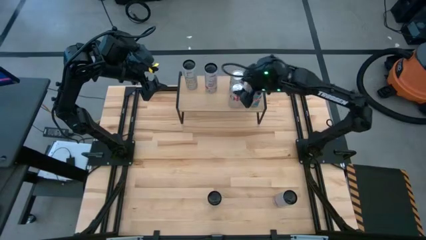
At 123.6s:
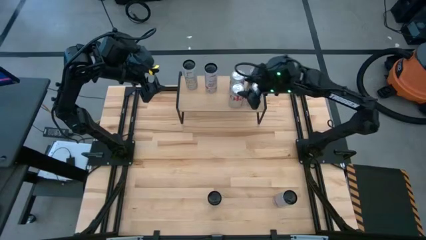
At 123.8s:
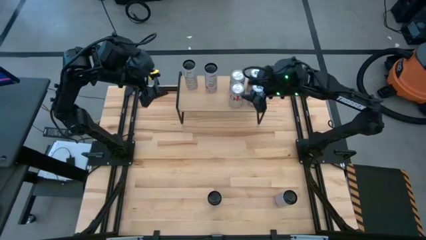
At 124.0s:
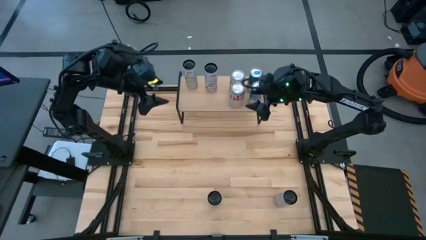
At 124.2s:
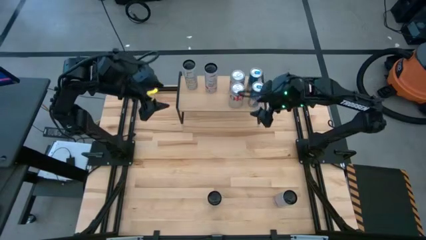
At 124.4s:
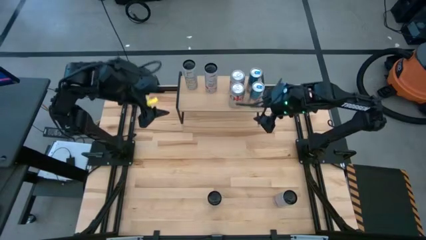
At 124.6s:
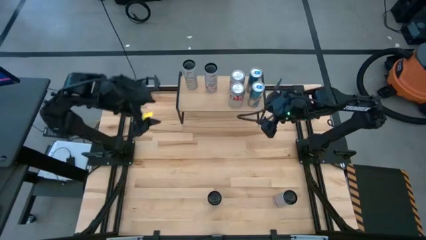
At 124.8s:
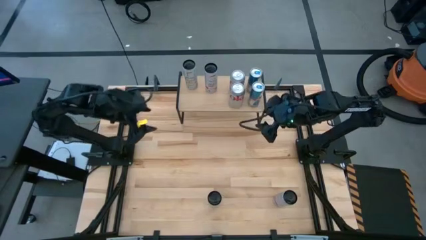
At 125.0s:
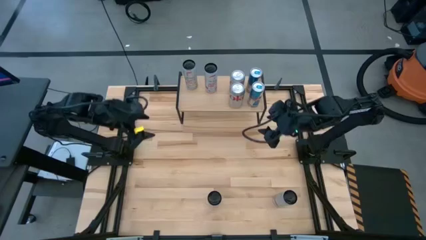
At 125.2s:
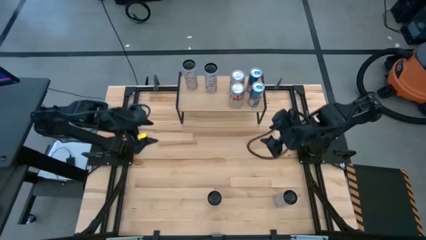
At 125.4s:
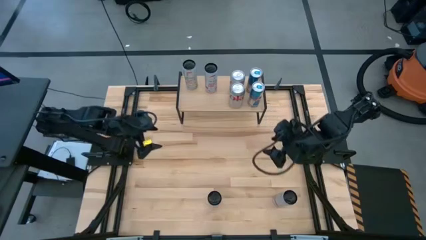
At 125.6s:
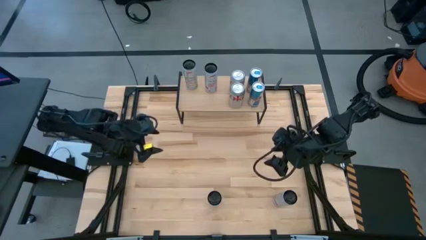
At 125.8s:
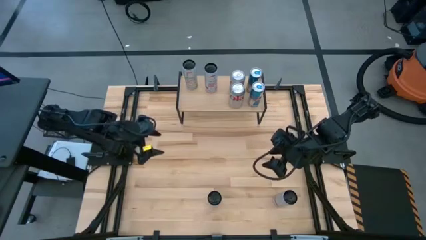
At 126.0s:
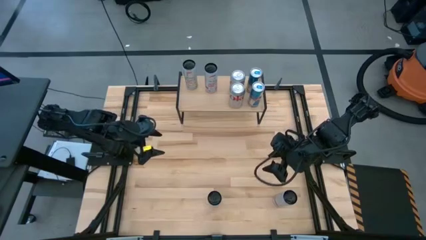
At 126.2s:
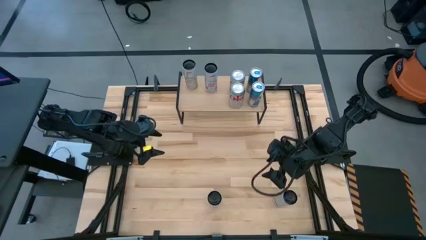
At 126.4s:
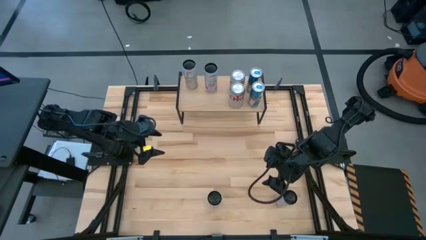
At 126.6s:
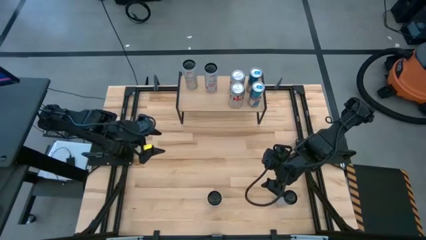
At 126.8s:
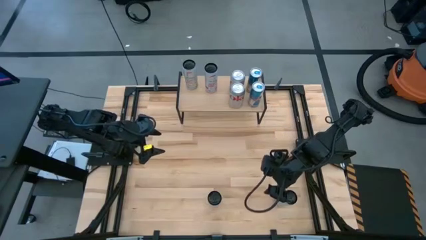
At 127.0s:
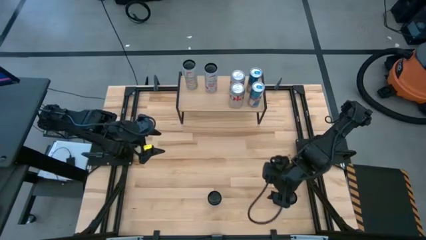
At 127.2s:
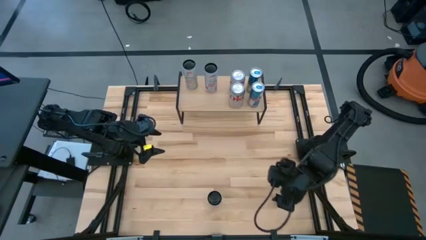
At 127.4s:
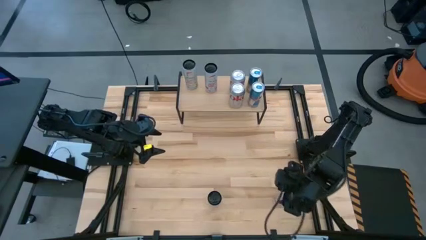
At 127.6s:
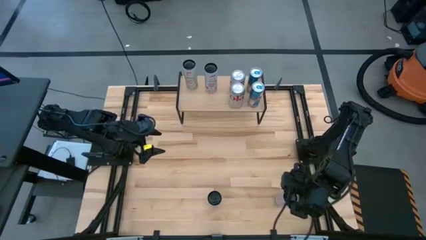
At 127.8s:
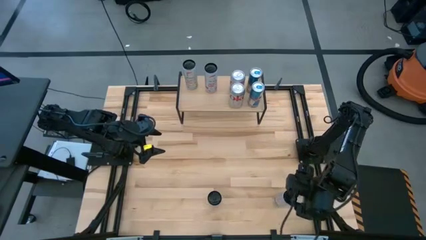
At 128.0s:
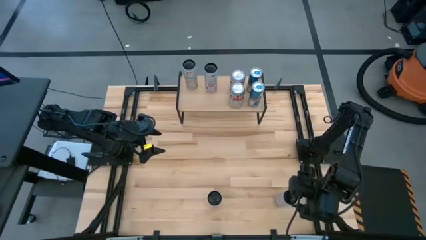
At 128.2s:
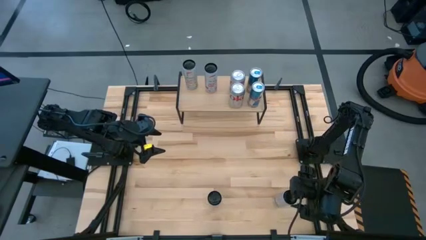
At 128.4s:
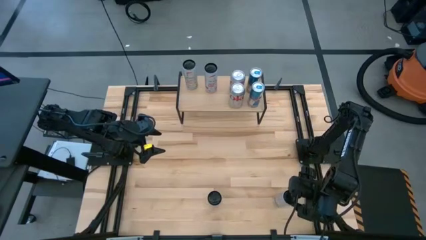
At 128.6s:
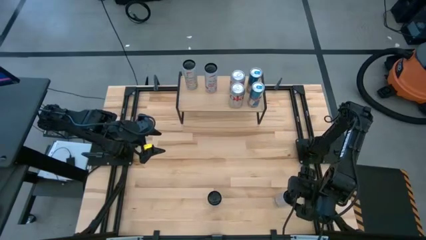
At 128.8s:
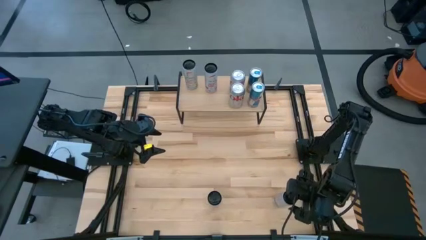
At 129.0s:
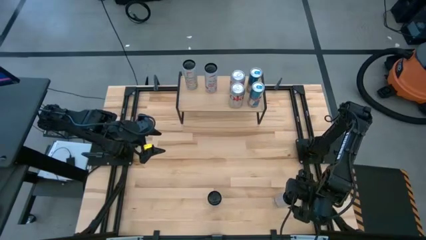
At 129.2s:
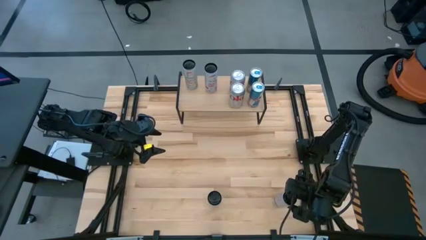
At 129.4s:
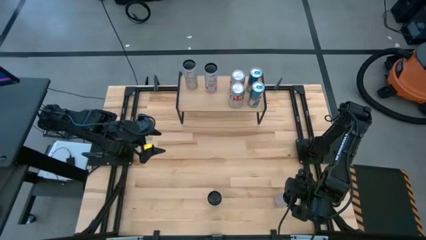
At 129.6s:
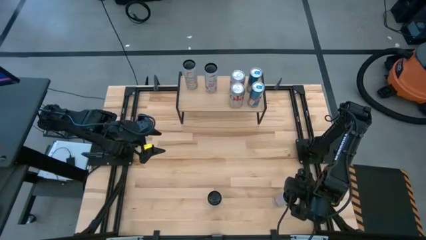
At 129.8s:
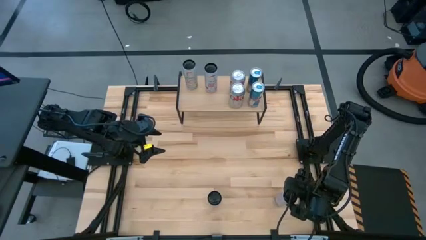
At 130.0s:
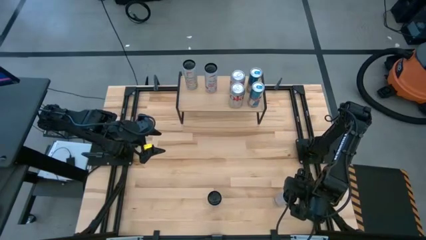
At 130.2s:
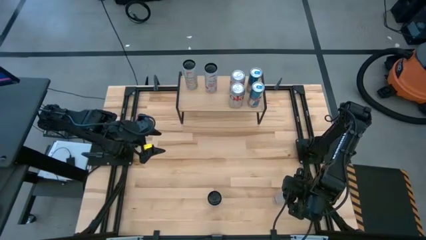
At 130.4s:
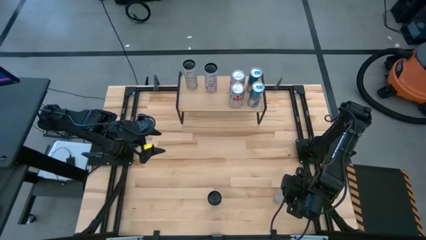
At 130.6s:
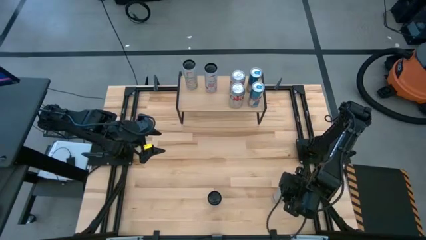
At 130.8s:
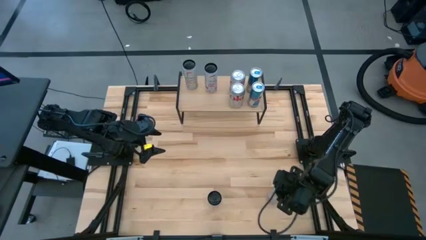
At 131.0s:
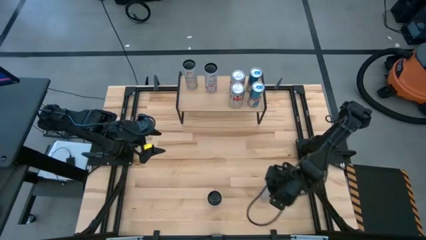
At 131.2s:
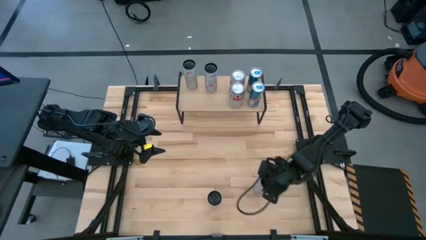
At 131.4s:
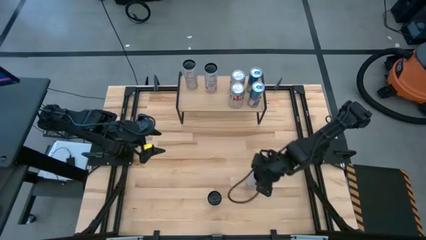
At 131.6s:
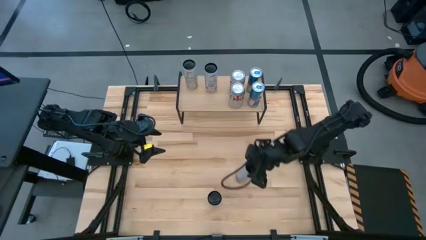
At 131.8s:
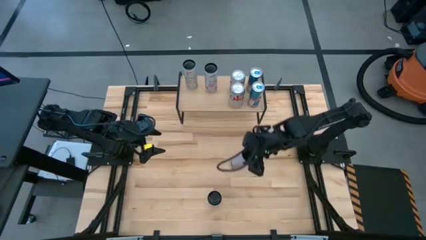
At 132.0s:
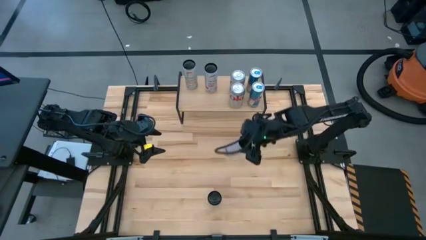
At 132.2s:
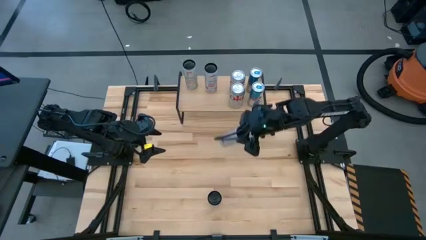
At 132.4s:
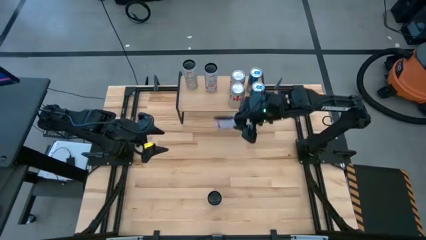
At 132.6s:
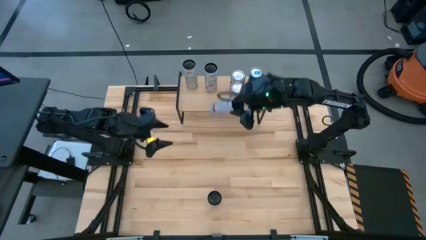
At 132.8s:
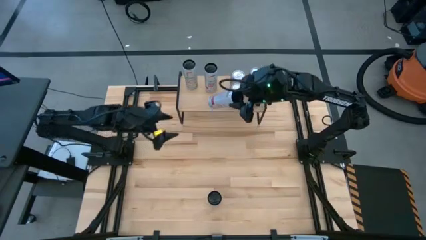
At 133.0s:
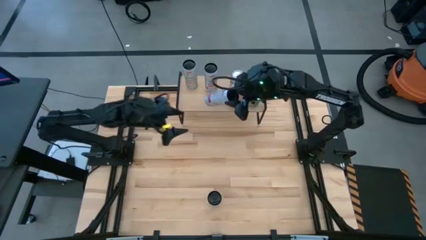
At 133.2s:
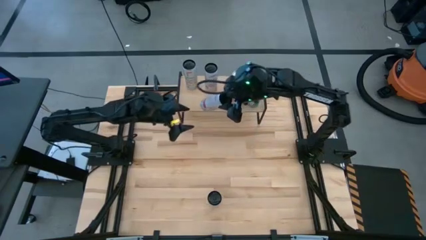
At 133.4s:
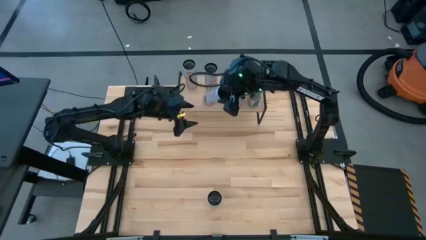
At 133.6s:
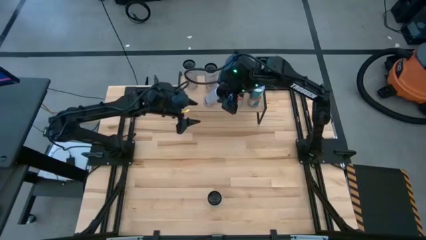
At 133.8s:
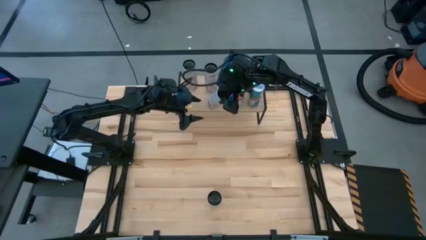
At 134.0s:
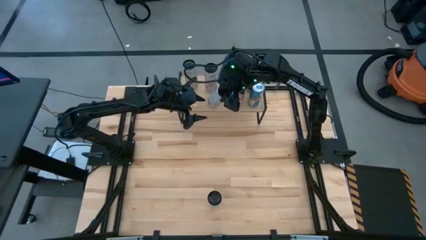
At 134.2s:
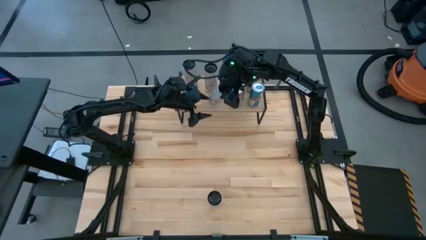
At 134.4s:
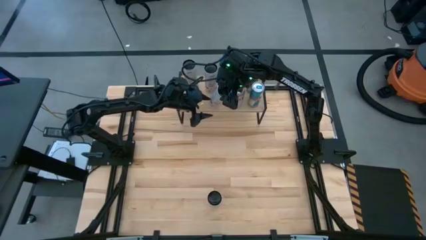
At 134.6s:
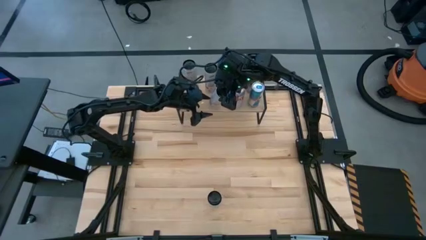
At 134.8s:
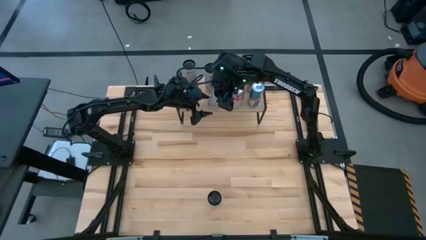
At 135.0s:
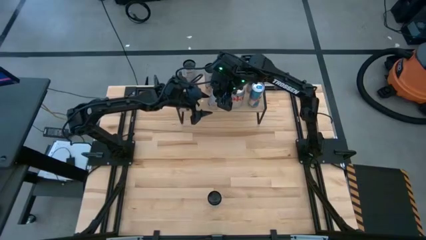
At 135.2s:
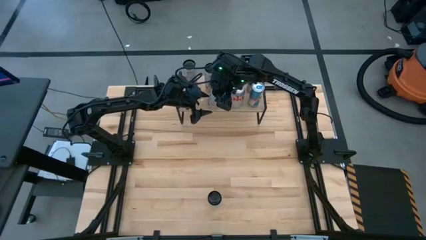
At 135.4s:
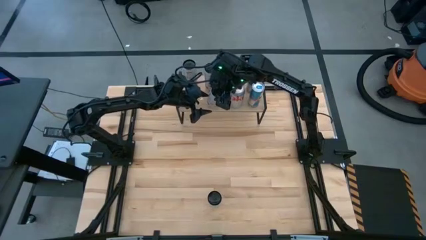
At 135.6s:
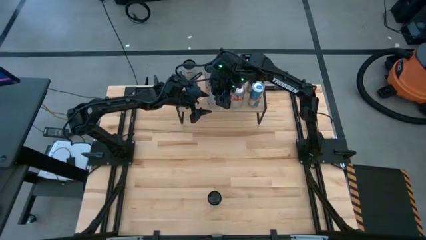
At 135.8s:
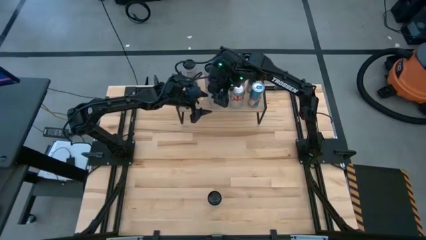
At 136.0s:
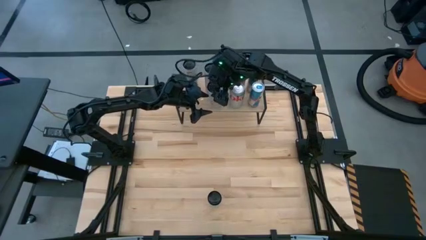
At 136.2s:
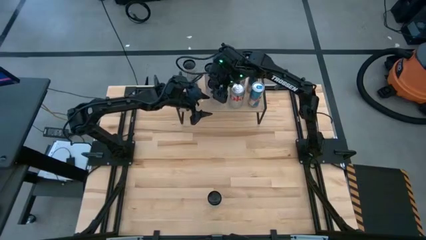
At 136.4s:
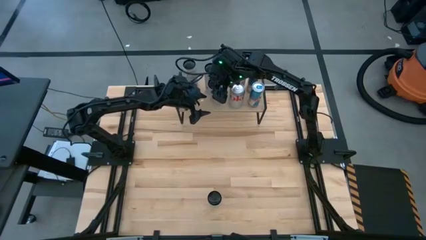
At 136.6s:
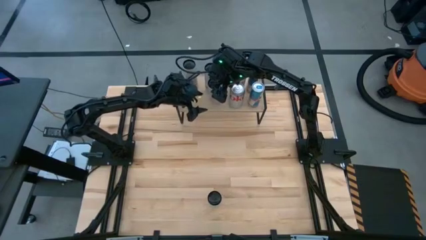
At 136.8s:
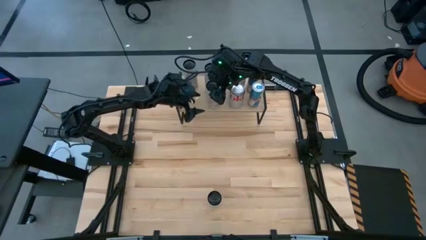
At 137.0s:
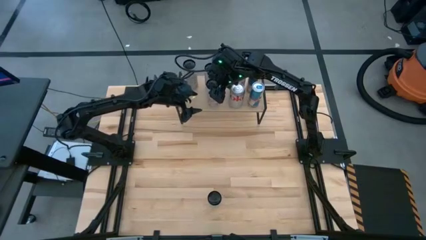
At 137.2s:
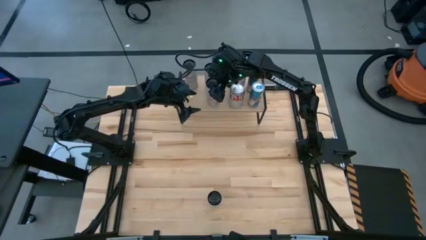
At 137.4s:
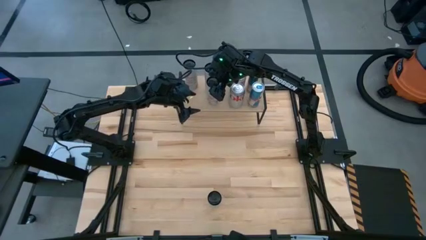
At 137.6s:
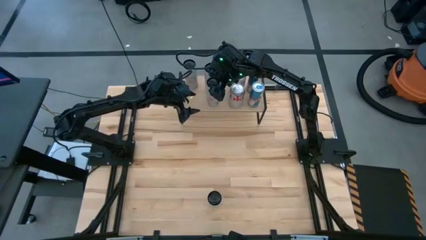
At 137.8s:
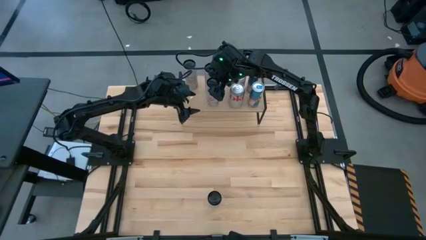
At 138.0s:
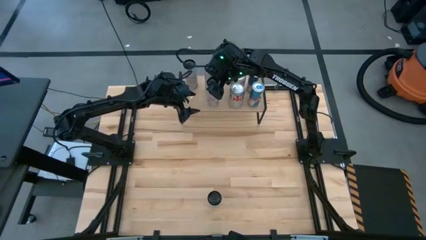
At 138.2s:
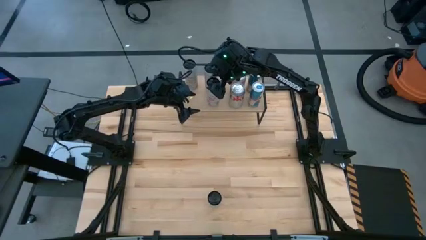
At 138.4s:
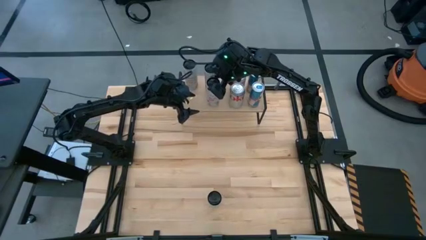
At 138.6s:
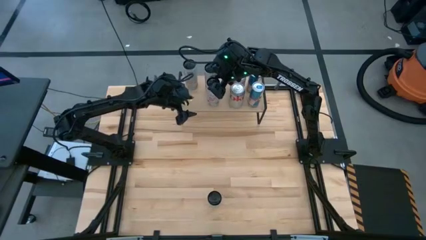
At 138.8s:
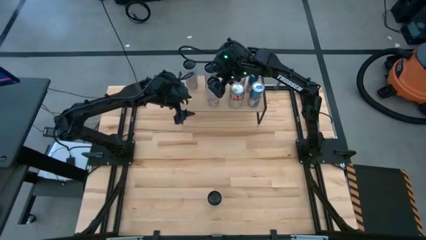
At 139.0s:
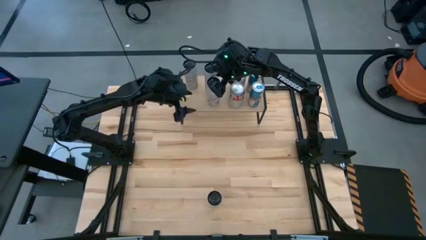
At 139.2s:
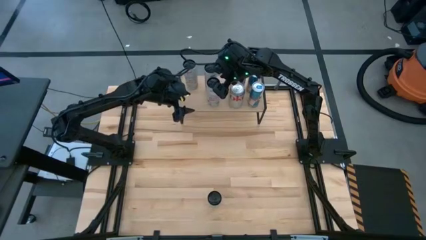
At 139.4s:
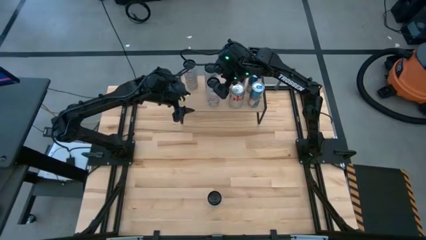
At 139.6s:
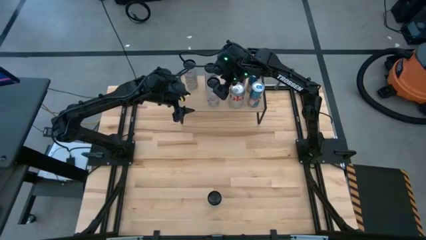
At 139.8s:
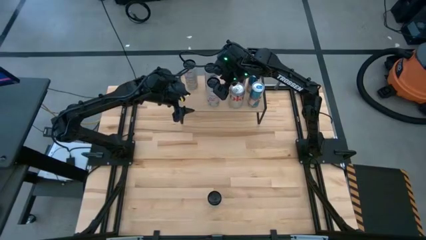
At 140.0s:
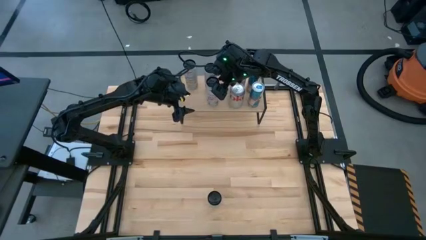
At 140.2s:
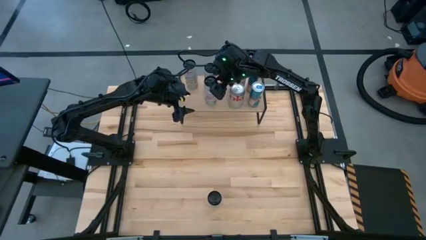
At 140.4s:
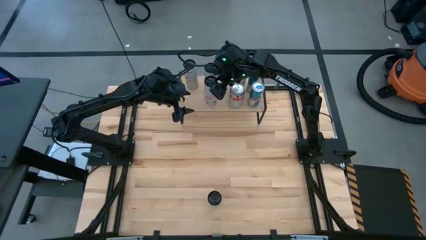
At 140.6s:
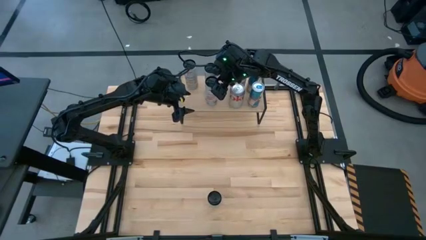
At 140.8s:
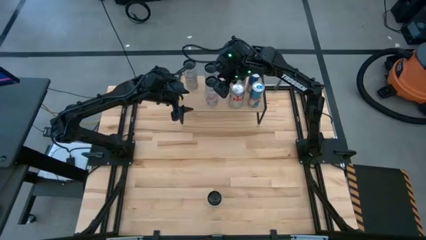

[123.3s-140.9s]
Task: Place canned beverage on shelf
Put the white soda can aligned with the other white soda can on the shelf
